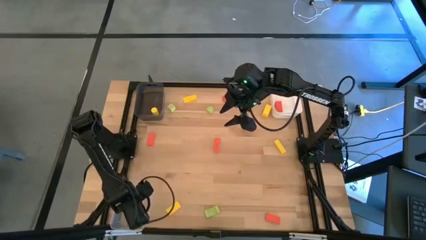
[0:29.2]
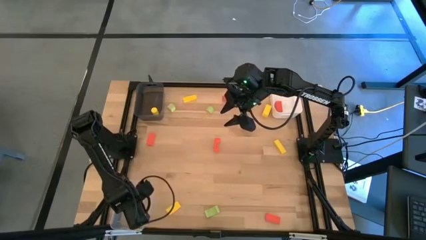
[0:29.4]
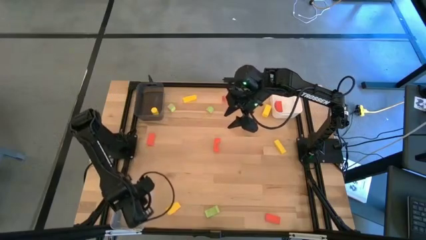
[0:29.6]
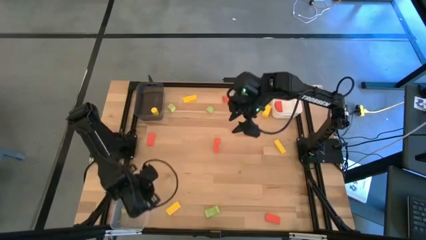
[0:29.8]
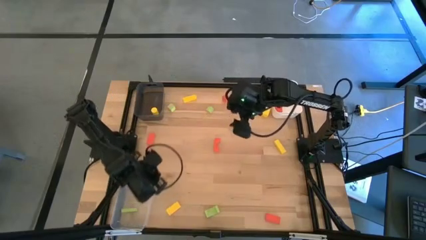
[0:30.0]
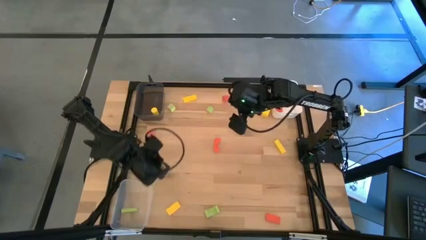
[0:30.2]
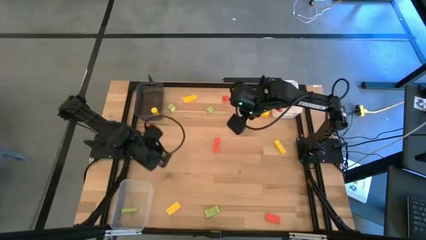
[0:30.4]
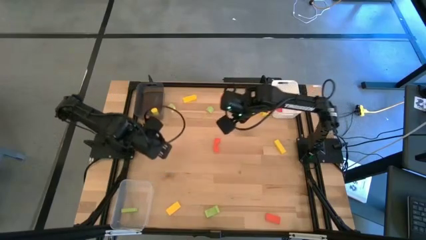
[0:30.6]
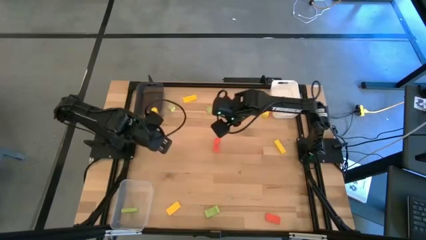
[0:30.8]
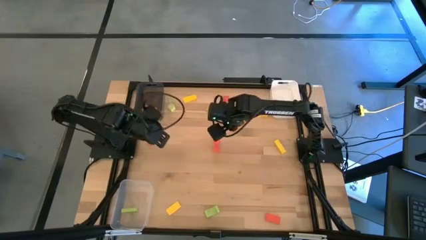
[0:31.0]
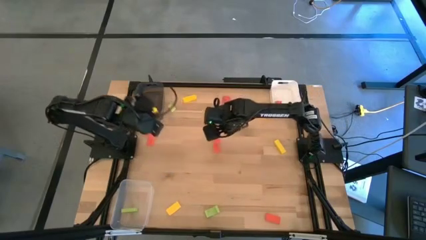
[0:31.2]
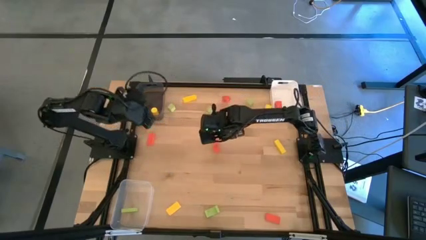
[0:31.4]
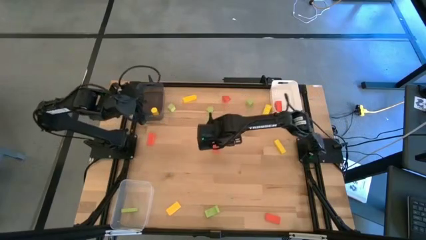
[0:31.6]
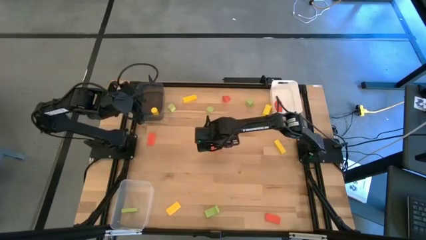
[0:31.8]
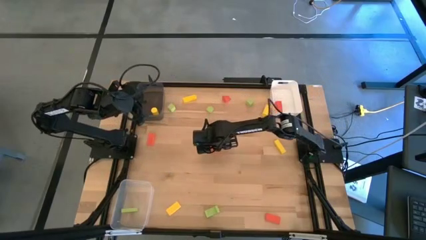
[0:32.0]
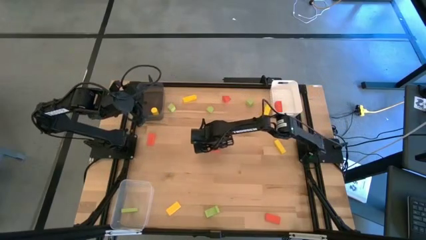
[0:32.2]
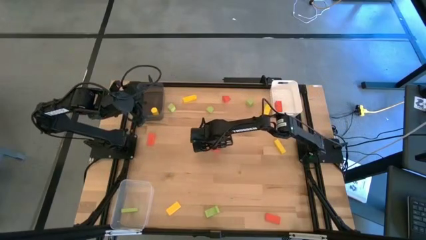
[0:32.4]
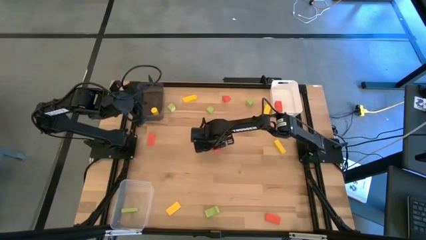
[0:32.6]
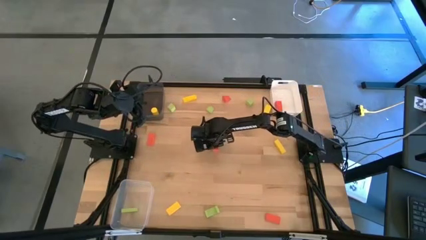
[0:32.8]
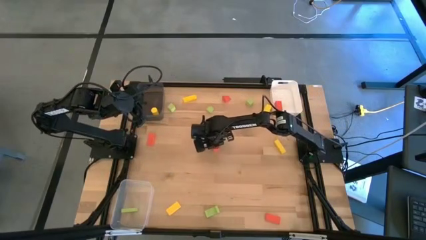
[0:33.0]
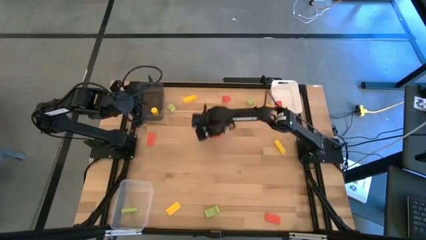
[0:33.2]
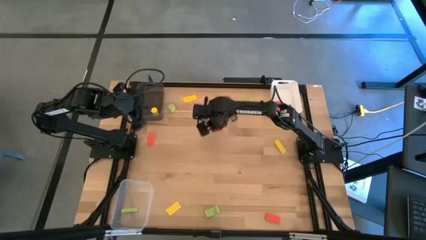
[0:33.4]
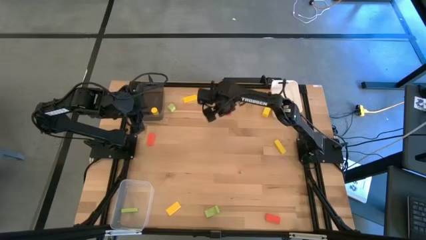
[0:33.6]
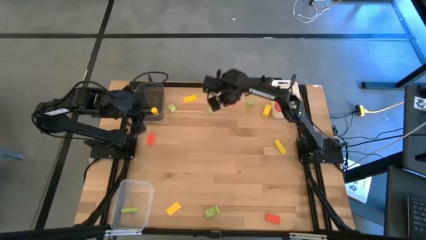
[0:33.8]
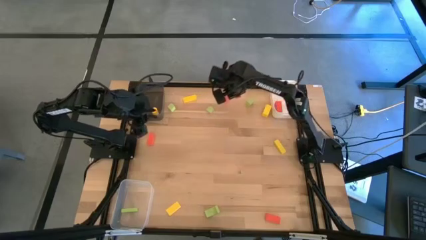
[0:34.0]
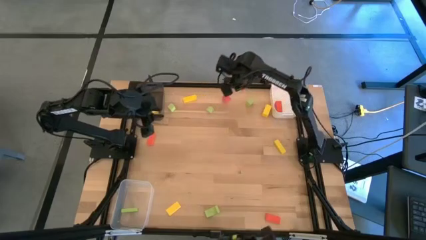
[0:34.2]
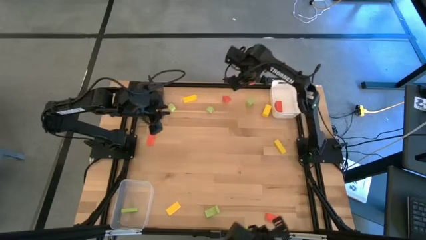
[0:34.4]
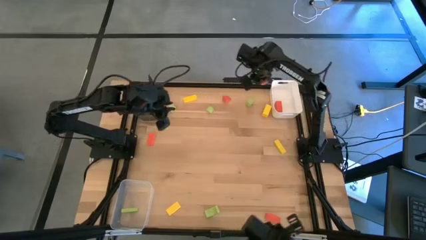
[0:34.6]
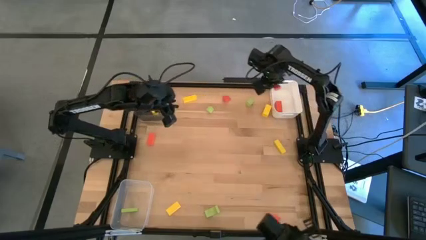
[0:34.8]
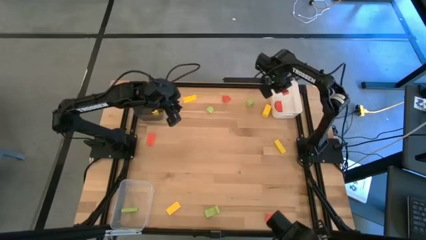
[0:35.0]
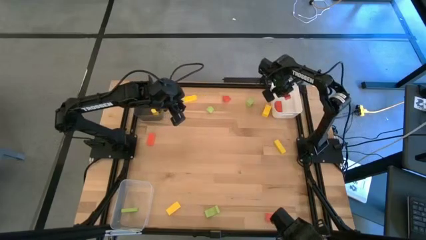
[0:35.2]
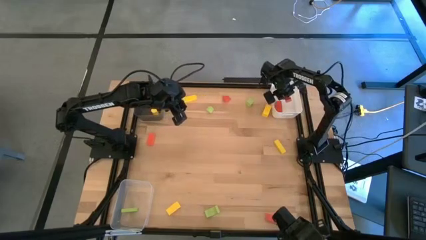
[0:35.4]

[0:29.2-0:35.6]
Task: Sort & place blocks by color
Put the orange block into the white bin

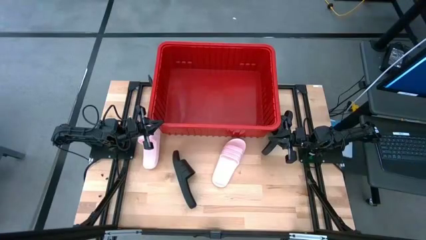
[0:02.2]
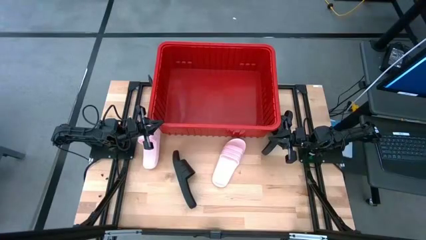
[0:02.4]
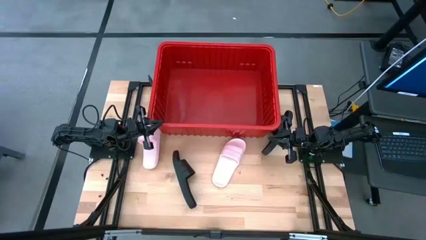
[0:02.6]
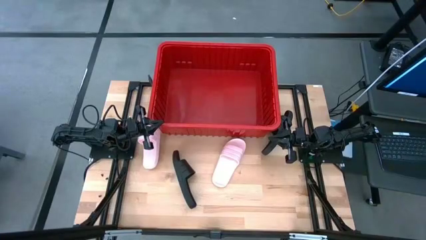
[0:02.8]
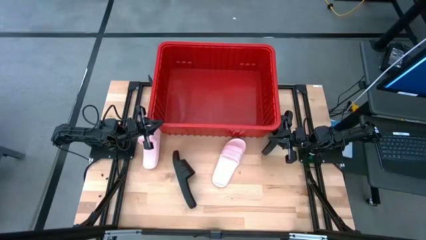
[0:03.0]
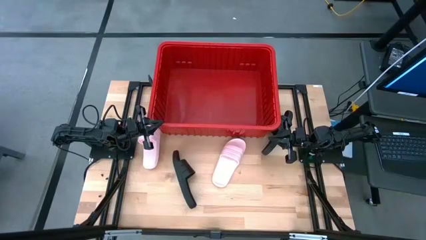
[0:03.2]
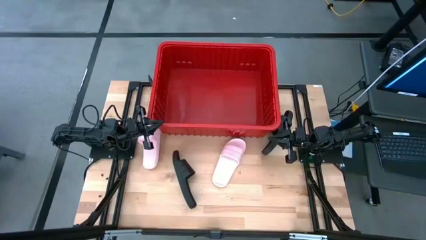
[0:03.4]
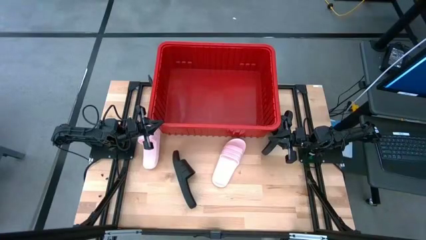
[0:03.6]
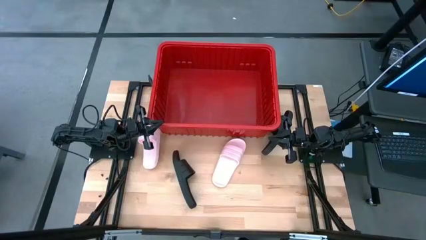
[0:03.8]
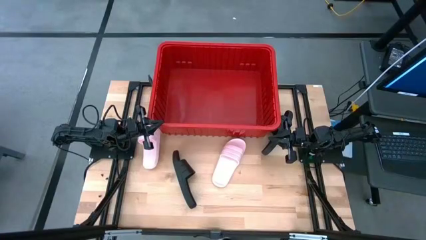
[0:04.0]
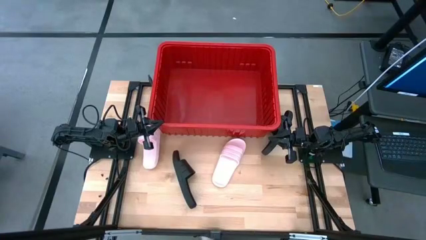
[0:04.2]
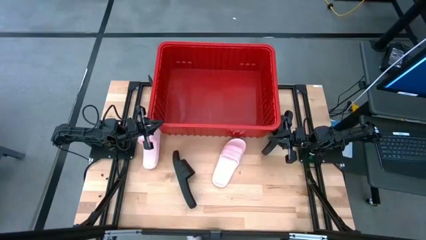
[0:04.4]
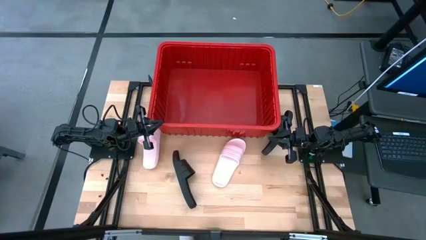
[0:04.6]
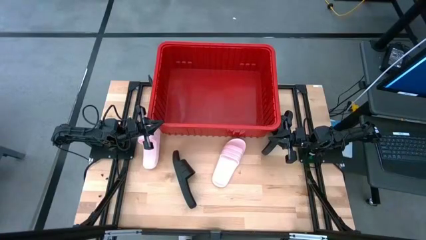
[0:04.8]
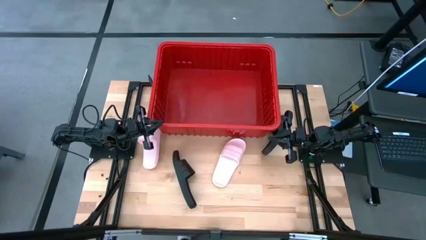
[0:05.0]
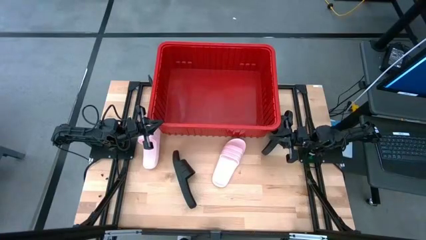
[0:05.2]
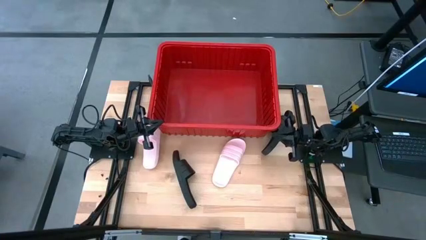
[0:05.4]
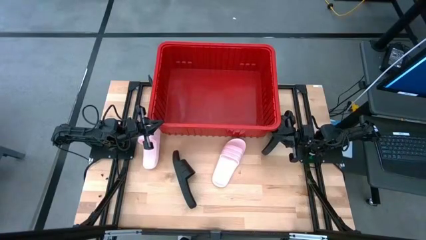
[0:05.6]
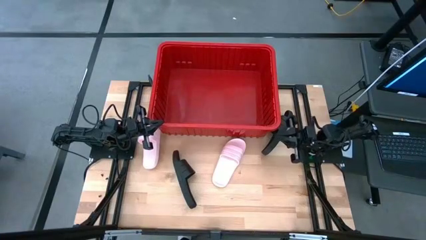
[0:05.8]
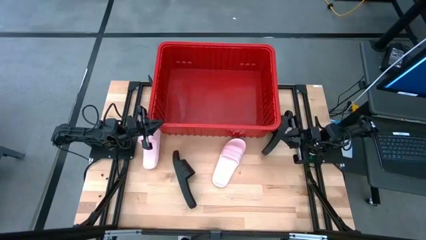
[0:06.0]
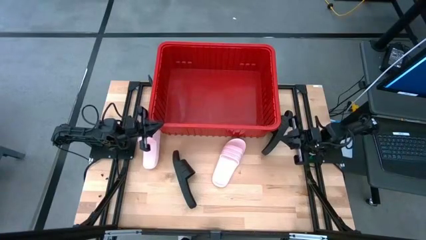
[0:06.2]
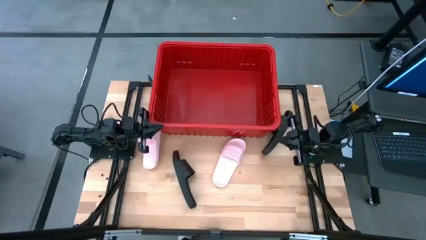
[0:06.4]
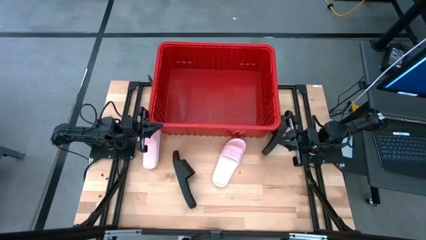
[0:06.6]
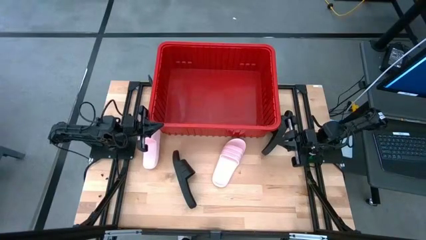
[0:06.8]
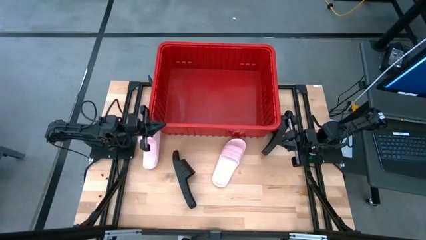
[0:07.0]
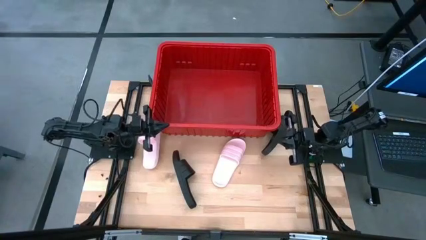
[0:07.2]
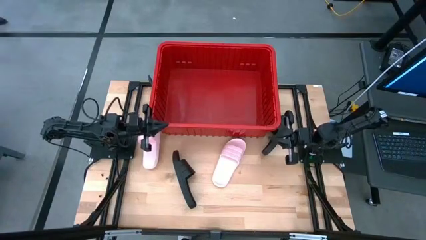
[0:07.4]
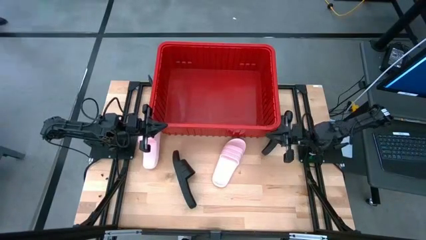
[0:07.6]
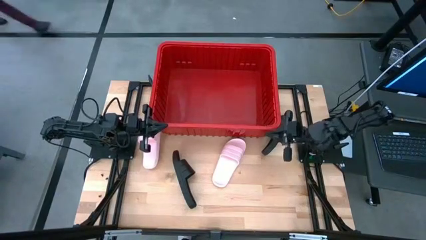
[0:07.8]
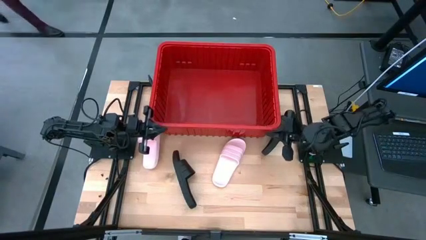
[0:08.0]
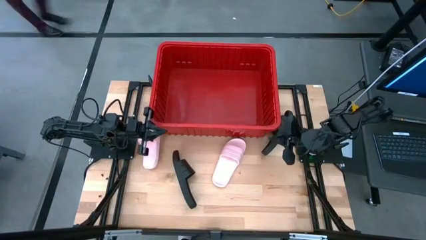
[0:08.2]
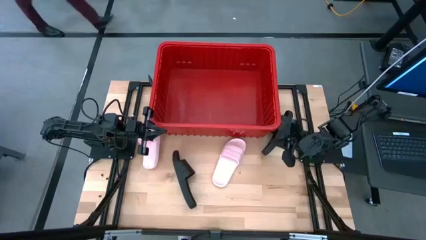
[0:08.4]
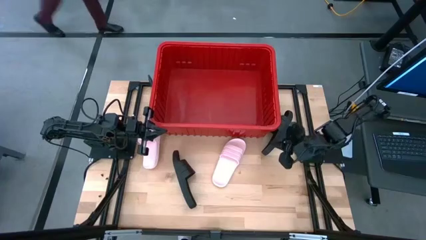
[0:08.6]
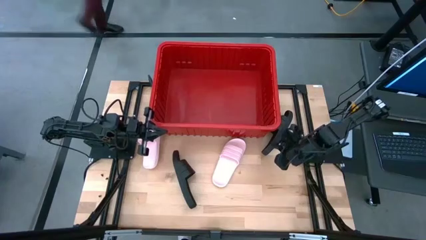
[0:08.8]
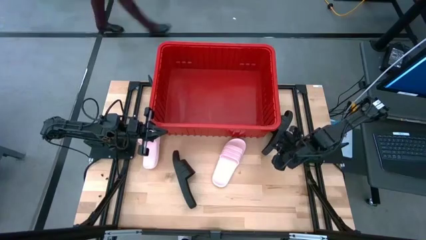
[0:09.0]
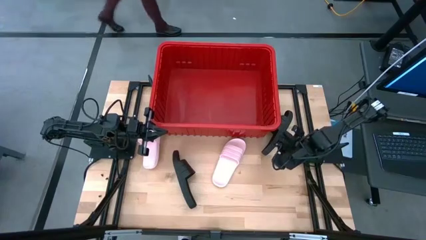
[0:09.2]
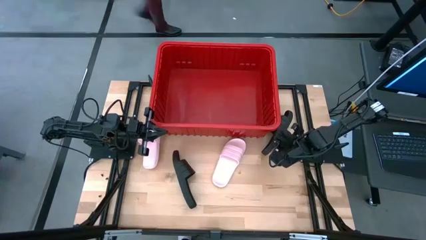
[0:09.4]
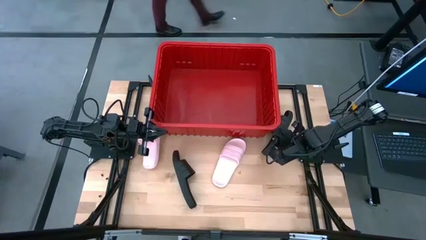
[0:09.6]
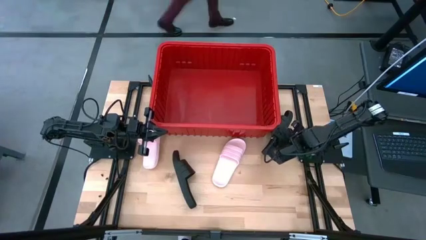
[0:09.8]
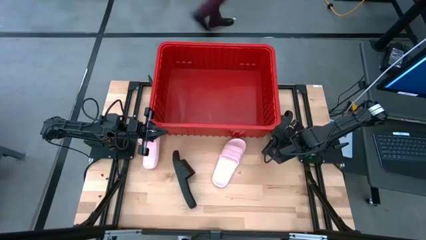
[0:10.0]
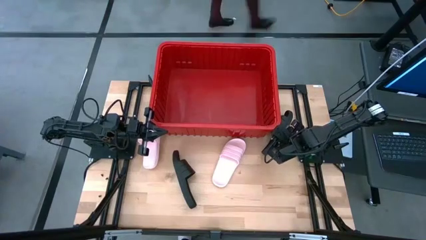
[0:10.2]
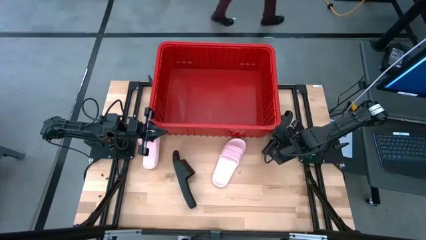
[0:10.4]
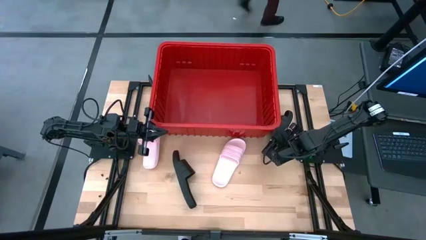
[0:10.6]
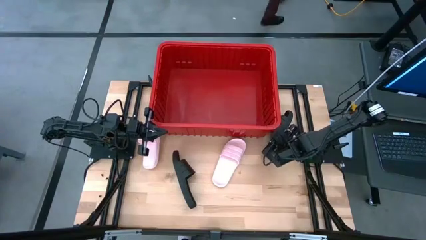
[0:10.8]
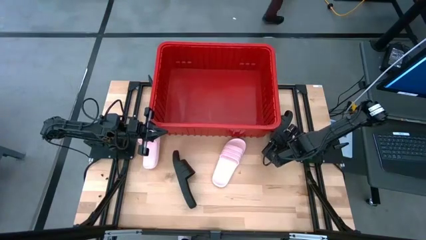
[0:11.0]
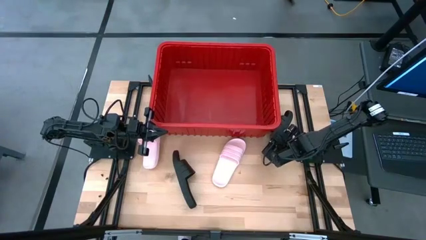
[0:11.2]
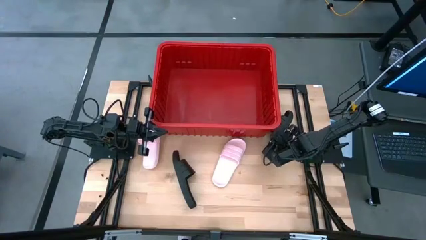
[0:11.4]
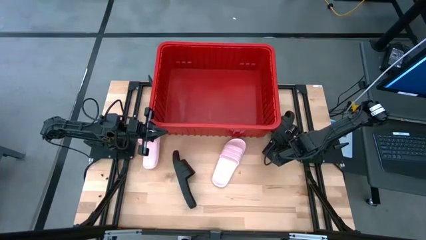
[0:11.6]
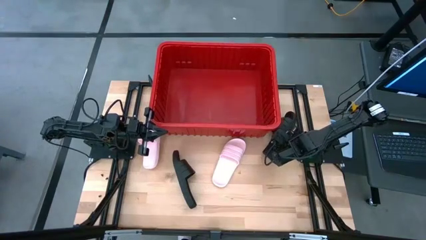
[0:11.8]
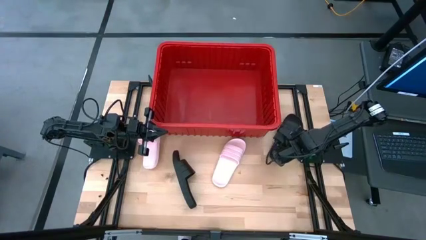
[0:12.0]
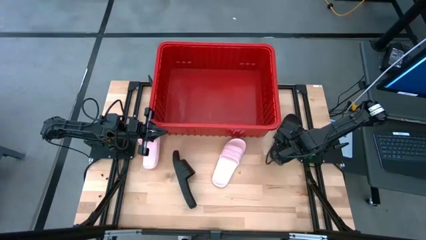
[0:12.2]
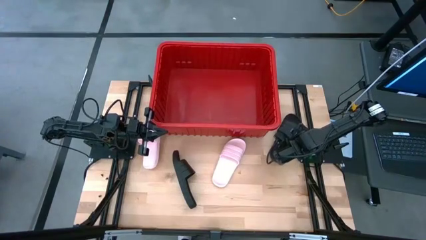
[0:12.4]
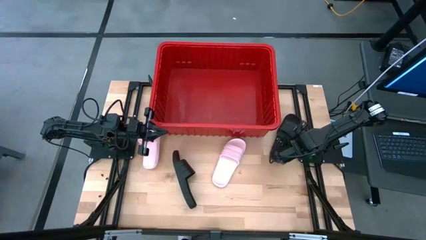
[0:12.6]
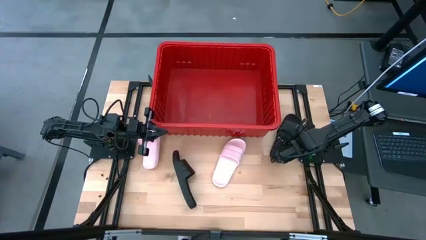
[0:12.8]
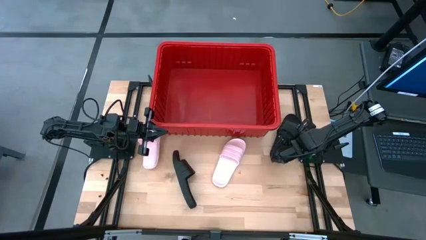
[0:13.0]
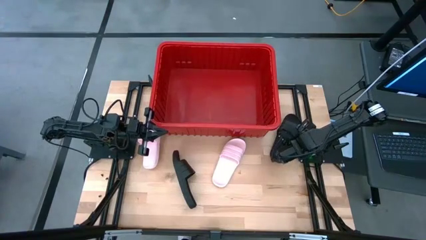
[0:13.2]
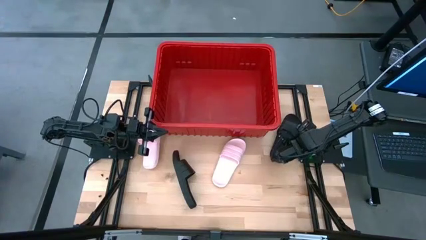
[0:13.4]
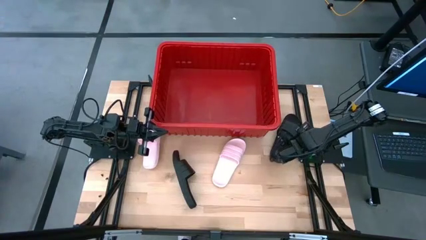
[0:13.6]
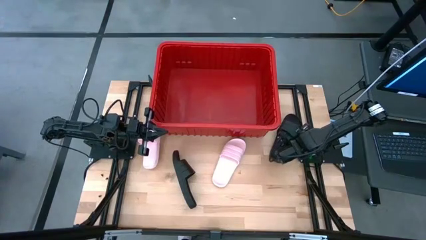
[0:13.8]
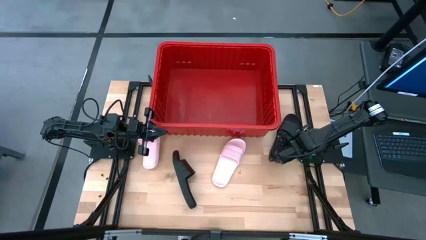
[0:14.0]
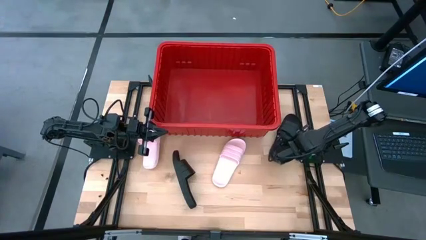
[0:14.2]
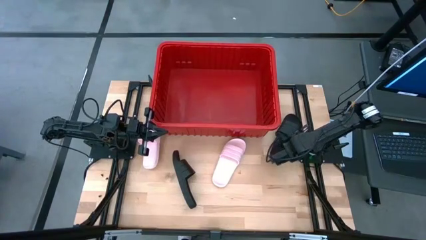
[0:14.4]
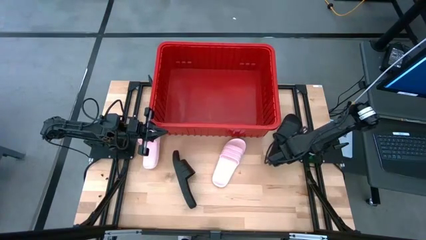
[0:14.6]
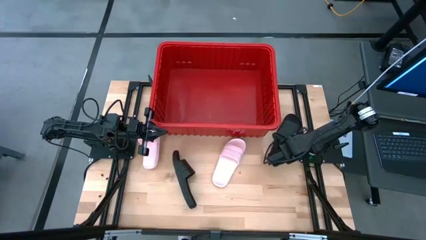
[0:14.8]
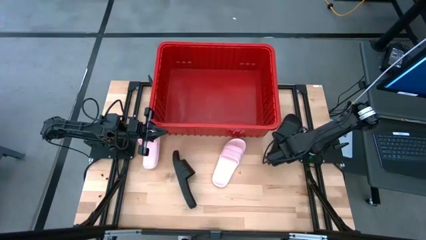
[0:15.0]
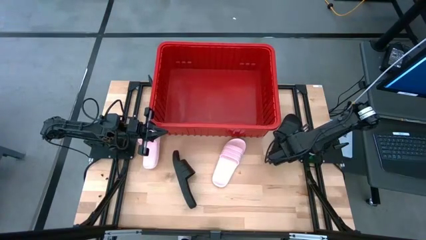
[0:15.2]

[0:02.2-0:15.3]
Task: Pick and place slides into bin
Put the right black slide into the bin
